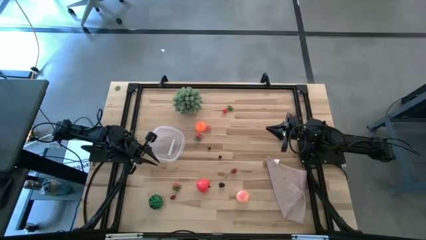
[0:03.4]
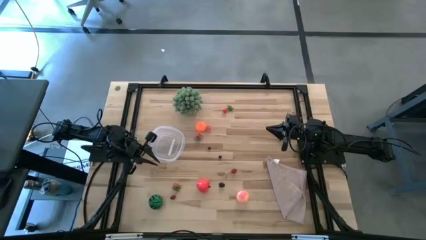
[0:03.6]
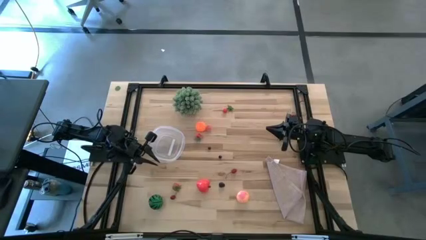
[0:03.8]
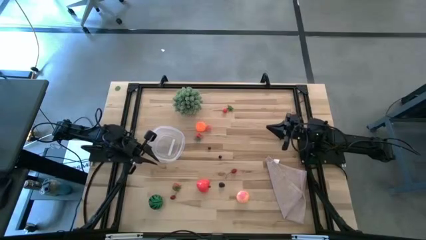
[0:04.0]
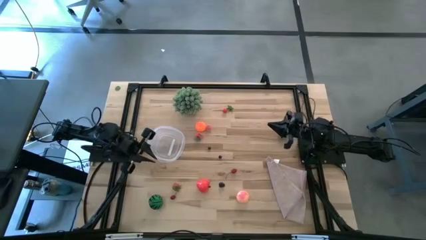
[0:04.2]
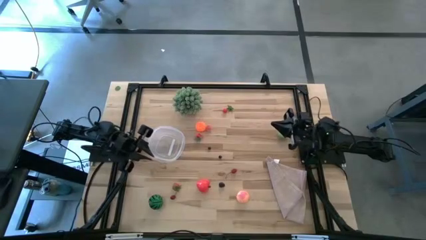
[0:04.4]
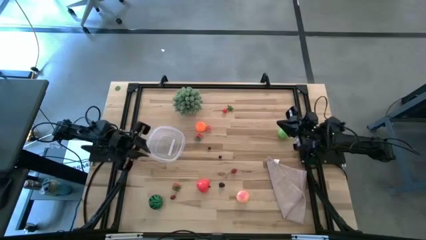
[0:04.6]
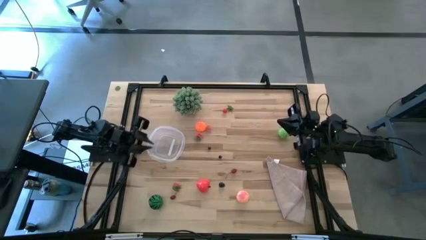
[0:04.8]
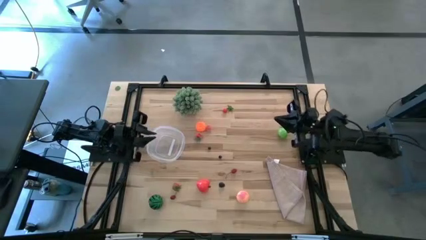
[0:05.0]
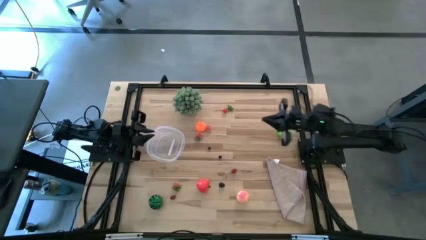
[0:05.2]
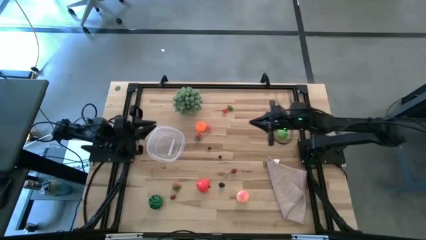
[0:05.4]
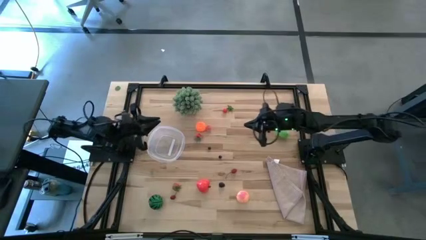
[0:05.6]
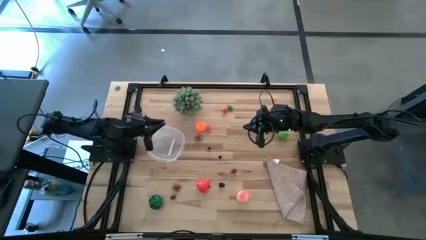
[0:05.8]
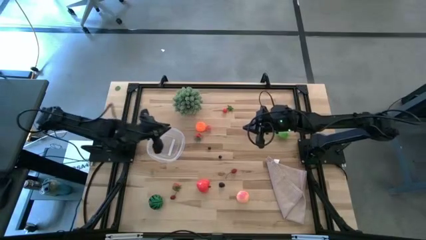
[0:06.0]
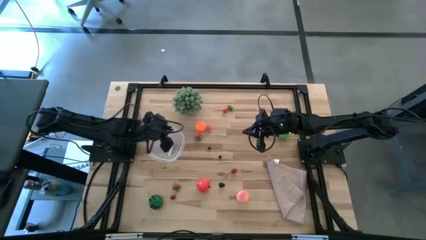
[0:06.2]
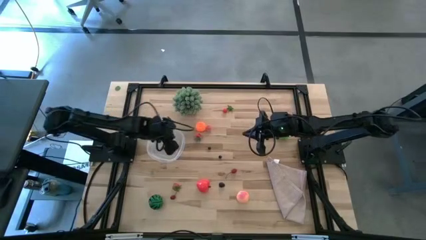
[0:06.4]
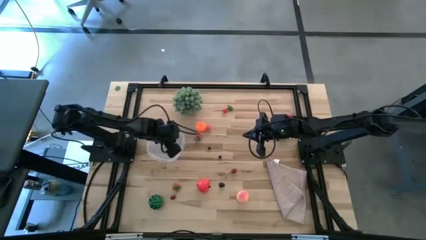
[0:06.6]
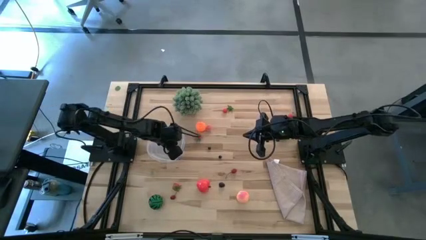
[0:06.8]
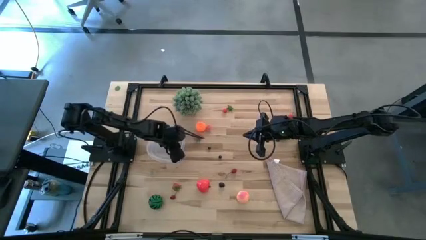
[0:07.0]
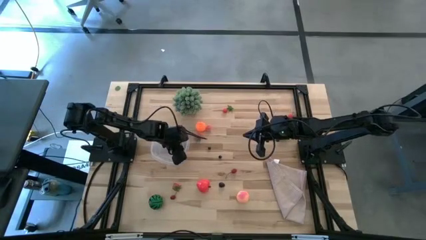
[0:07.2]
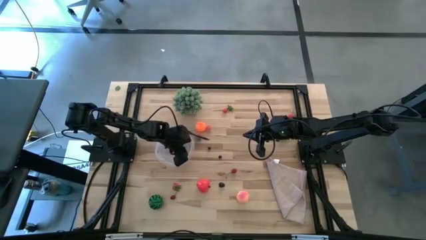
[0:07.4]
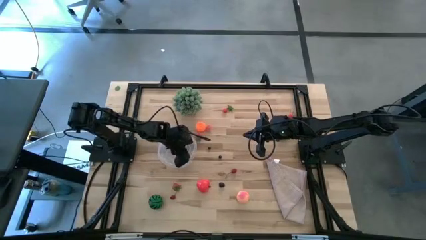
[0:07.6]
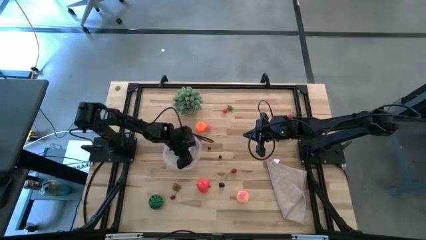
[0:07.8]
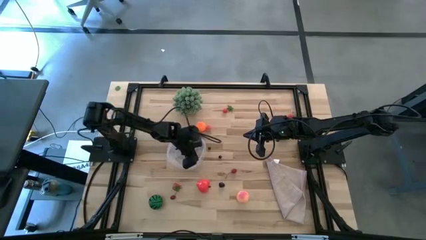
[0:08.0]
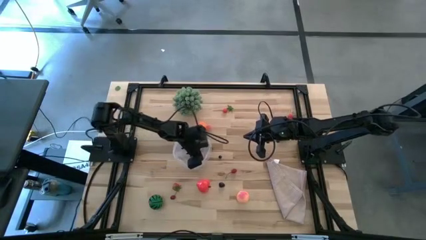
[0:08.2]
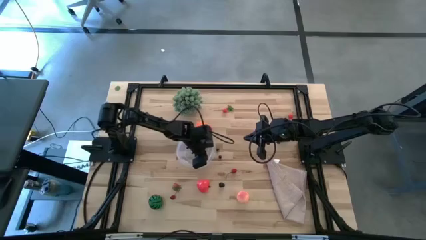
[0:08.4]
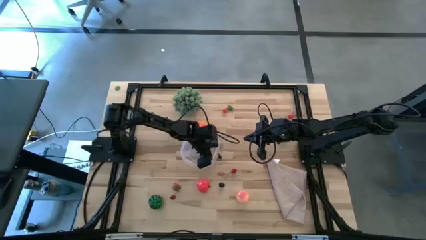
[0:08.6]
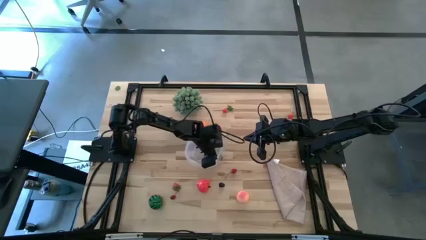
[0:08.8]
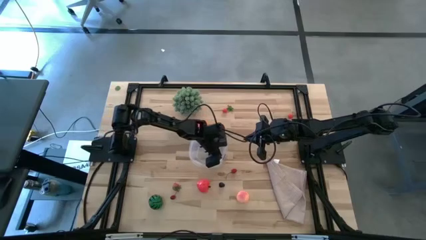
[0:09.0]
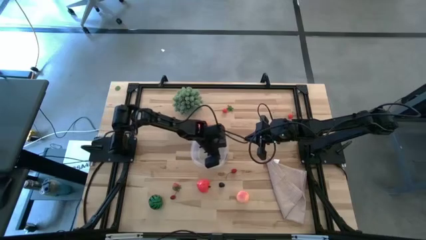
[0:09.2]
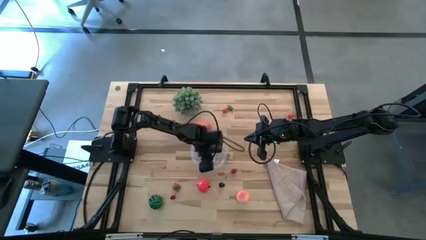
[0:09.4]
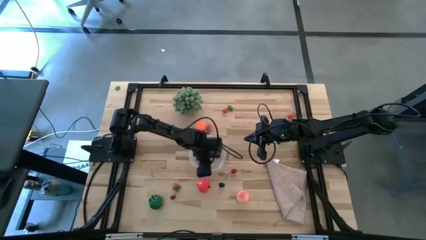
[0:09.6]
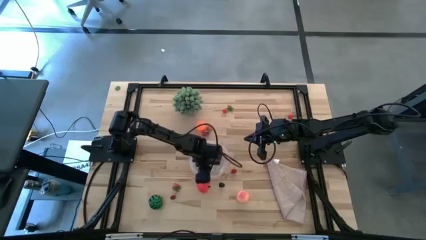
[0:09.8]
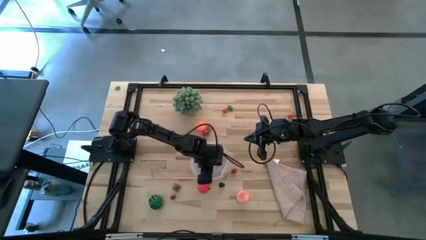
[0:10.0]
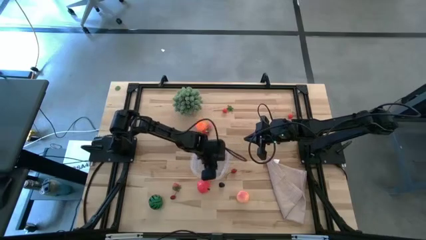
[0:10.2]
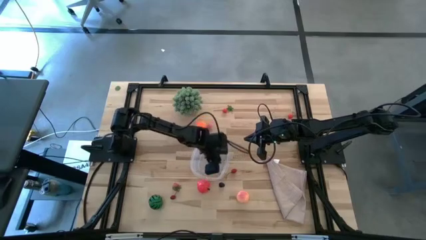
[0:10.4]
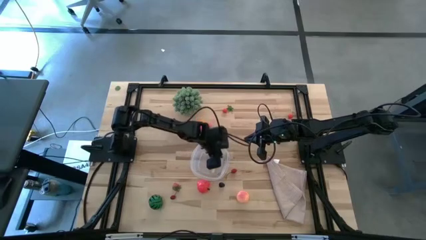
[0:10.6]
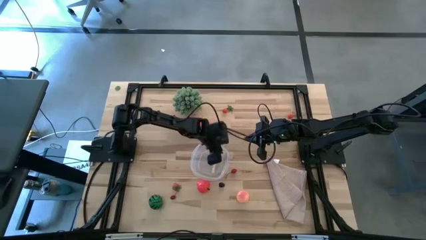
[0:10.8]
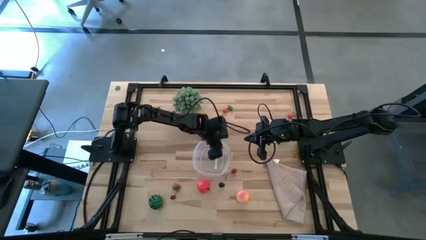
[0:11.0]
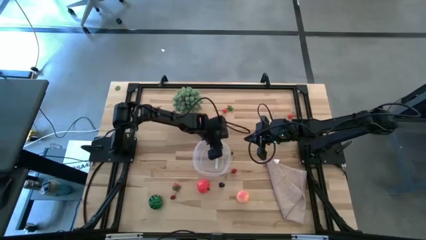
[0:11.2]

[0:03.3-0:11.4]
Task: Pick and placing Produce into tupperware
Move the transparent container to the center of the table

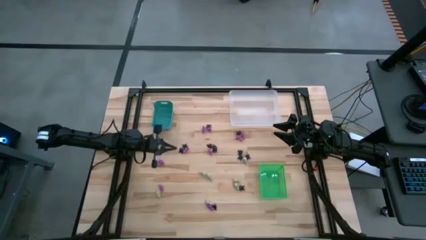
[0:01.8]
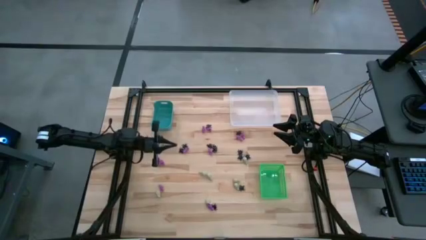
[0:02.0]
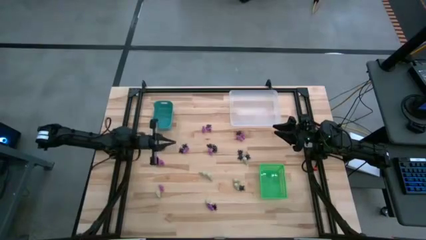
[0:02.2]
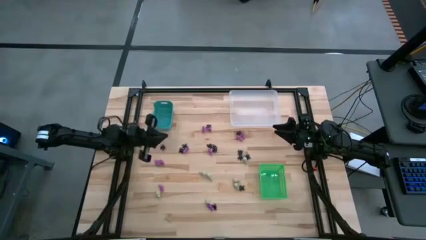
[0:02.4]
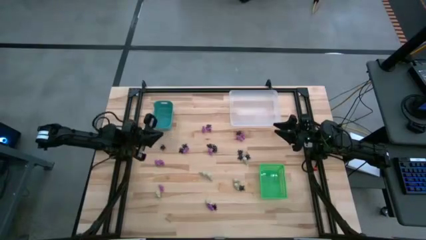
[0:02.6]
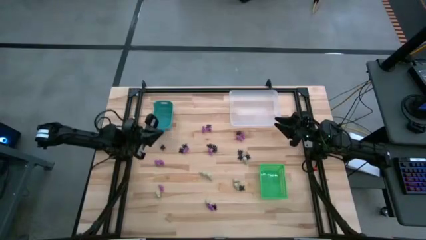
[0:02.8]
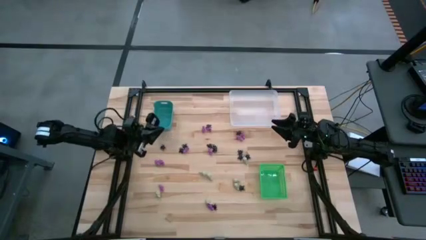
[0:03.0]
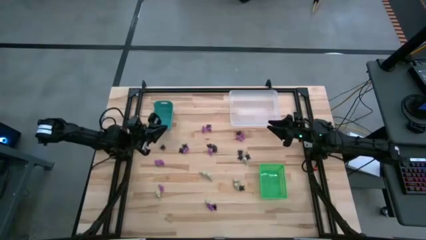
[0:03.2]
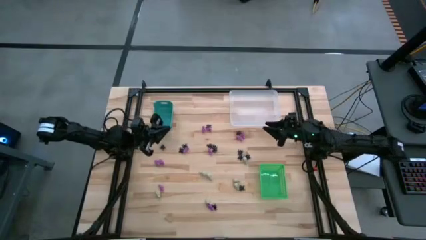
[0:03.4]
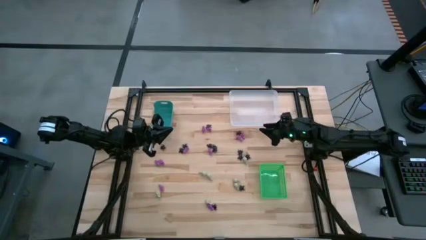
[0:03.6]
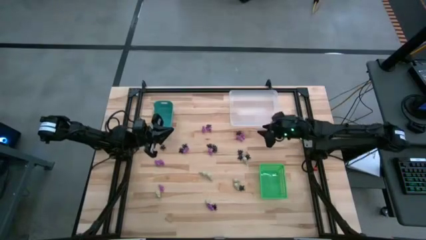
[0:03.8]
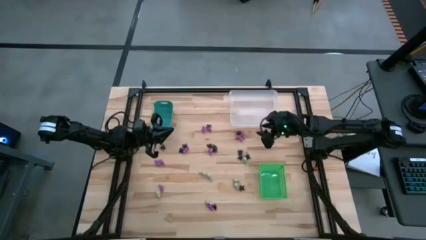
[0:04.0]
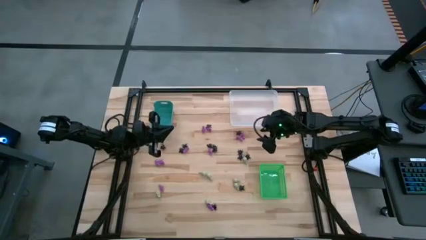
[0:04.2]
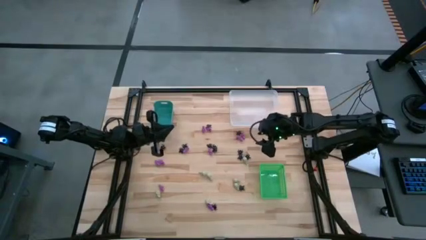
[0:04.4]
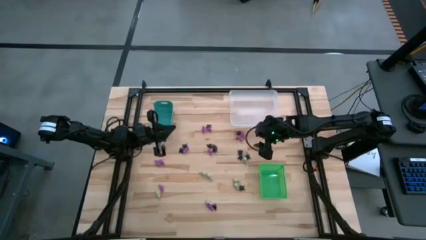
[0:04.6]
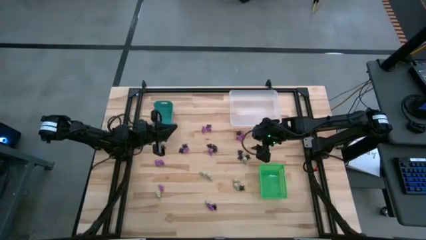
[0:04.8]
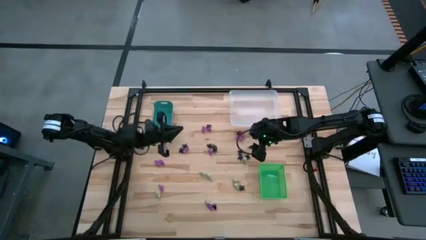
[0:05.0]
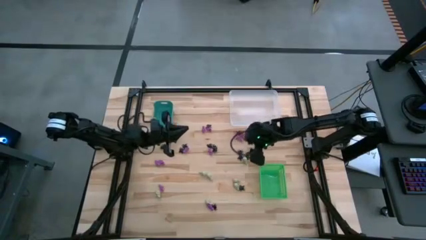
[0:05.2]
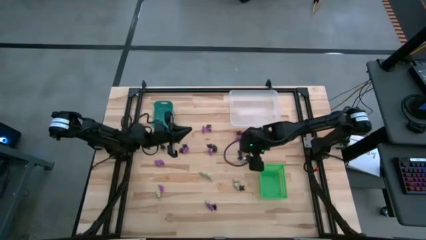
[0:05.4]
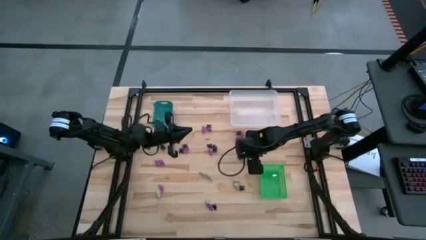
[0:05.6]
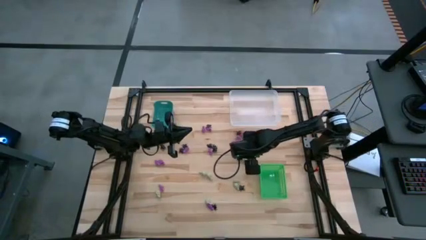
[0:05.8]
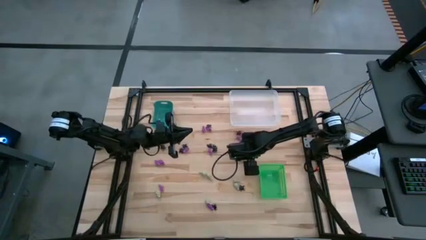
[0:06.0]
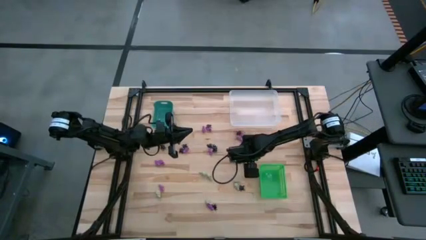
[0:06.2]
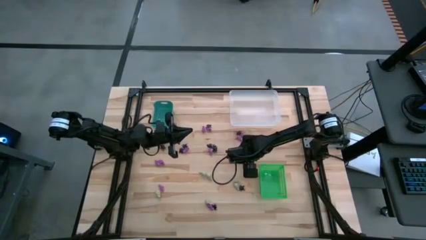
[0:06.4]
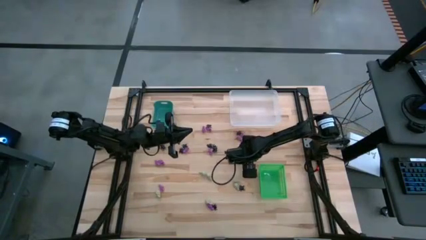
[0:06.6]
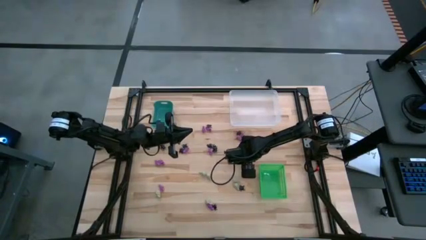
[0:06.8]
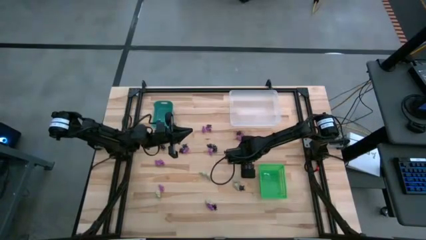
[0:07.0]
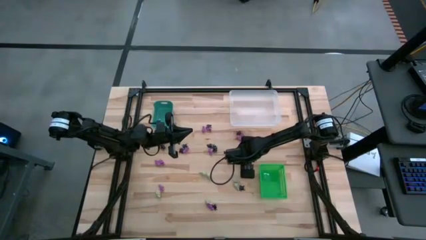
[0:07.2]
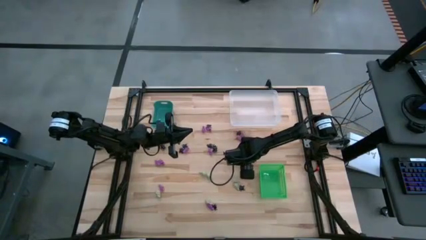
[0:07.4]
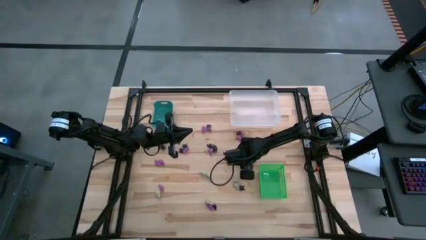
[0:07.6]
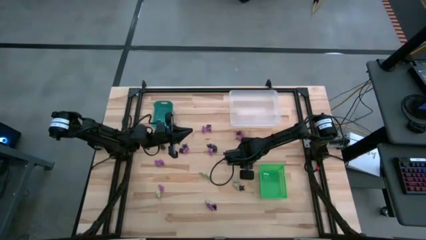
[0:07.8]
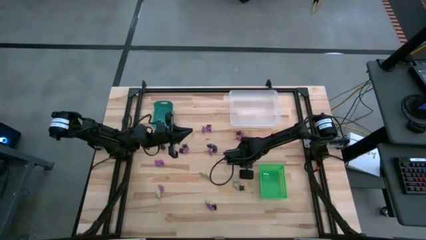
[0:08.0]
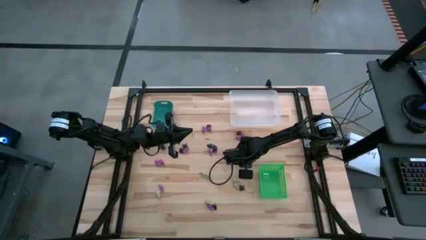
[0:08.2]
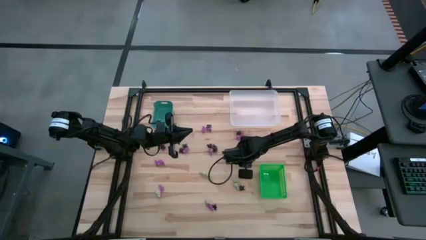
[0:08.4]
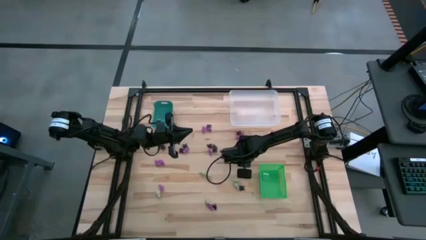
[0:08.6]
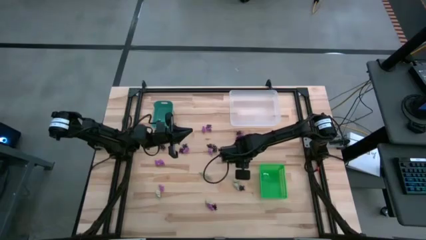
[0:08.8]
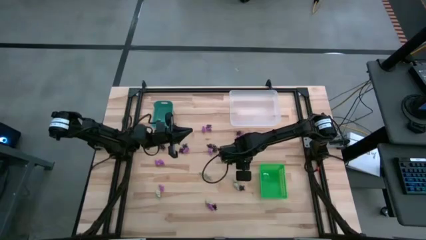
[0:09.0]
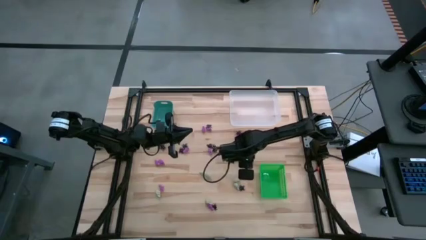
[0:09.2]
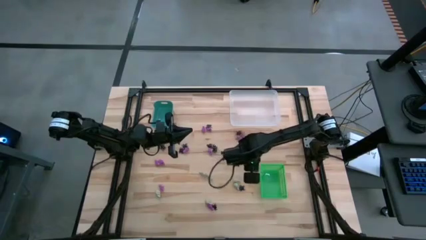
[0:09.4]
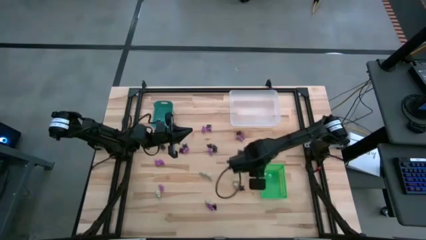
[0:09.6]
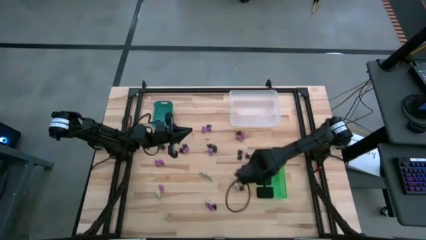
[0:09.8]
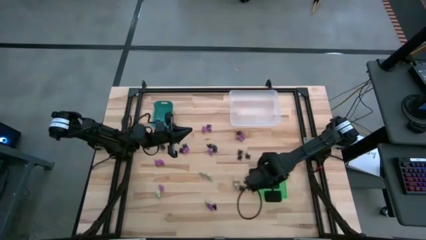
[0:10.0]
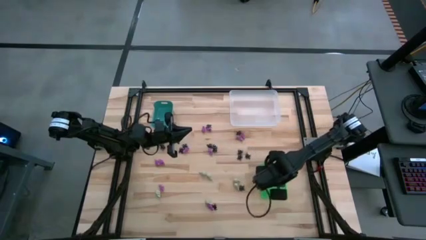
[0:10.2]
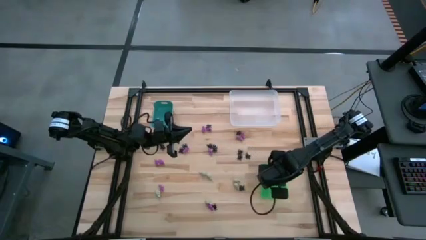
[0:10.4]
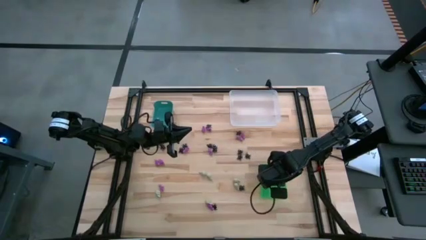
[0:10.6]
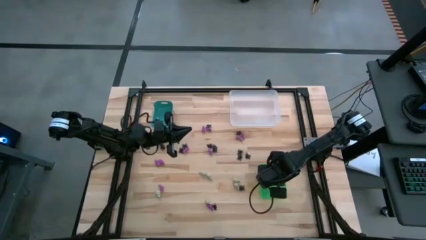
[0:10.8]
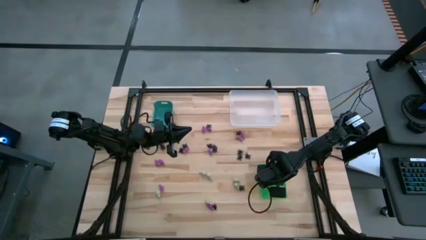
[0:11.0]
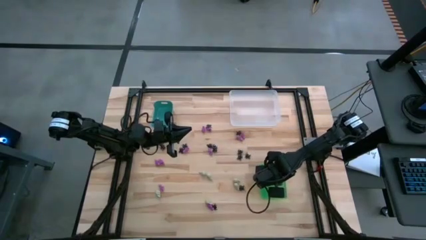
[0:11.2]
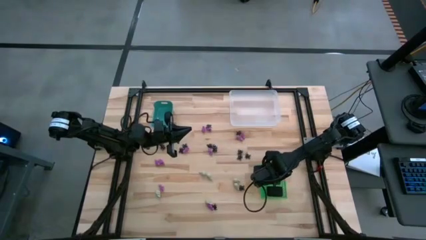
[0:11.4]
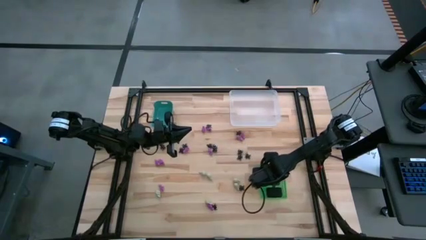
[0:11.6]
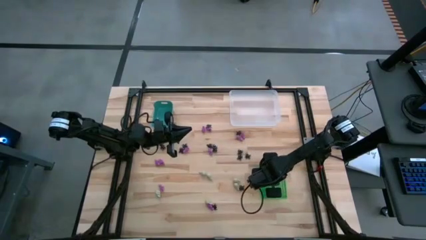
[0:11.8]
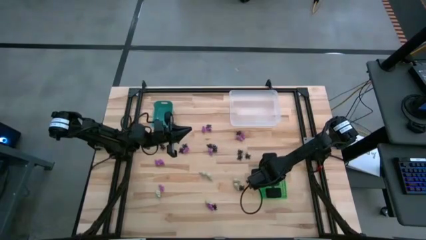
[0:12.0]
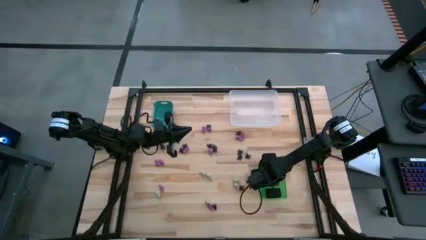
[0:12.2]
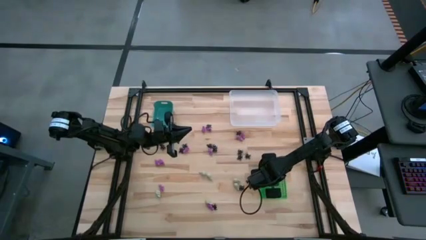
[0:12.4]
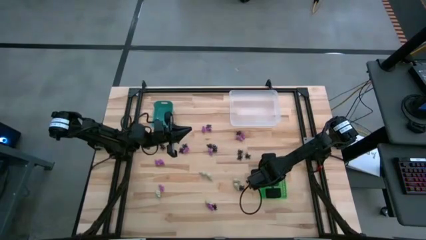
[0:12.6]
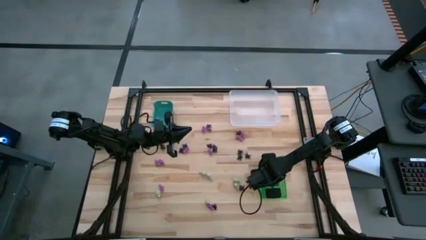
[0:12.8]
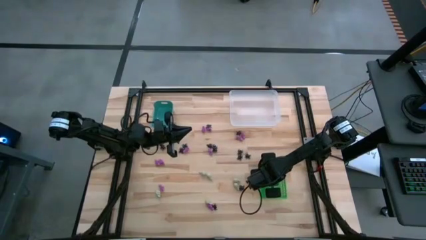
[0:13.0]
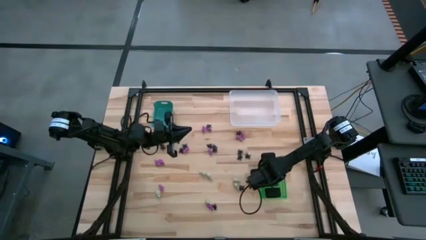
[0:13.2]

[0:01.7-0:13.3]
Task: Sort Halloween decoration
Put the white skull toy into the green bin
